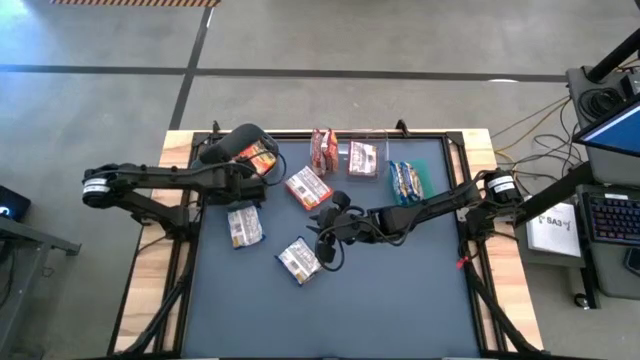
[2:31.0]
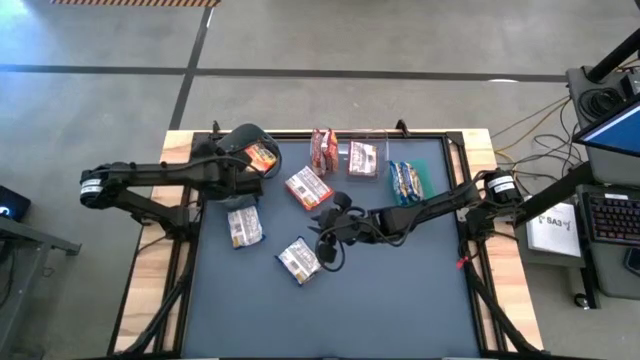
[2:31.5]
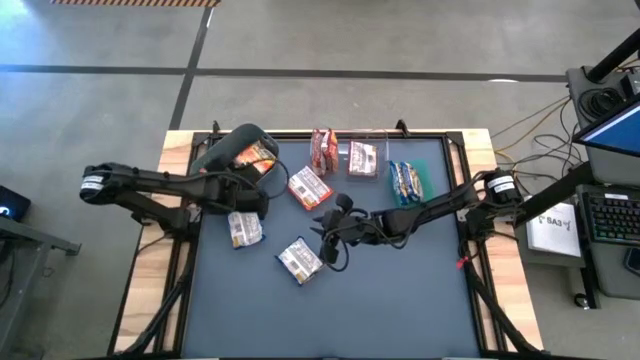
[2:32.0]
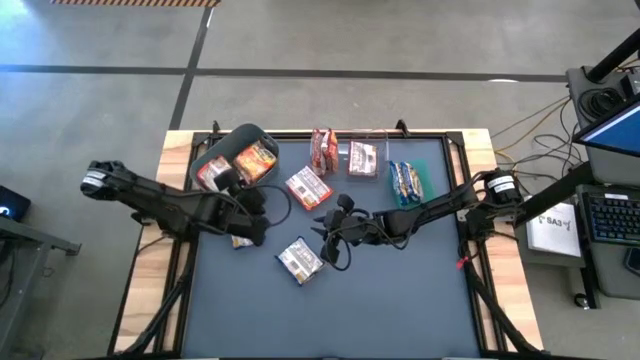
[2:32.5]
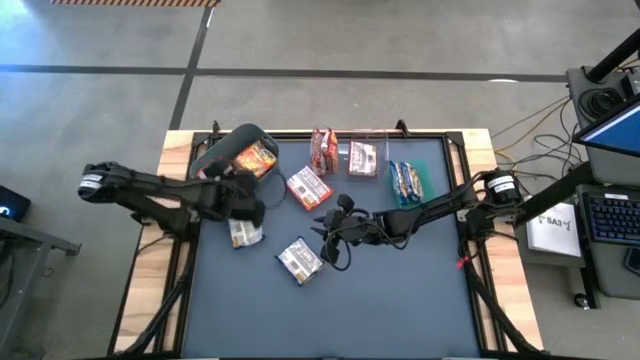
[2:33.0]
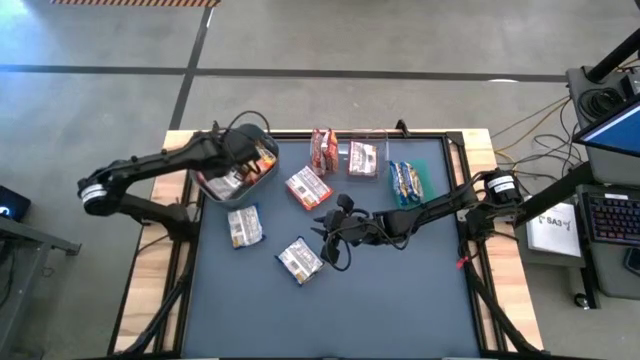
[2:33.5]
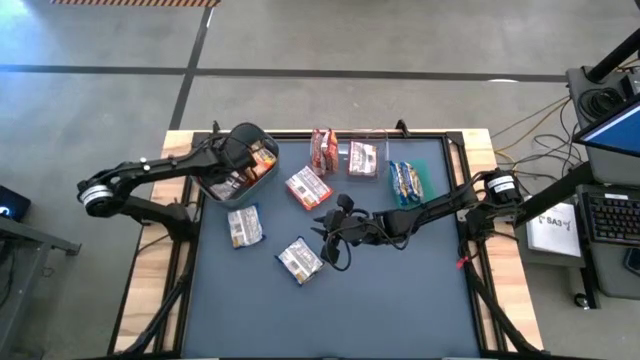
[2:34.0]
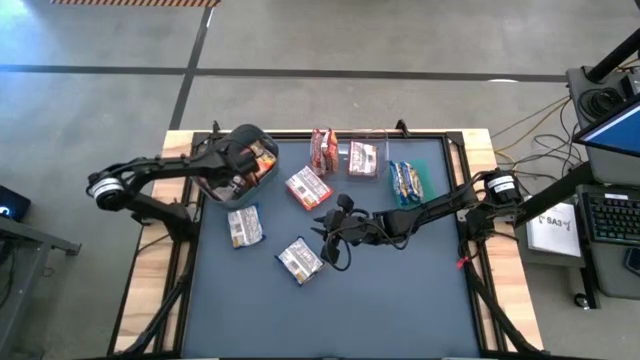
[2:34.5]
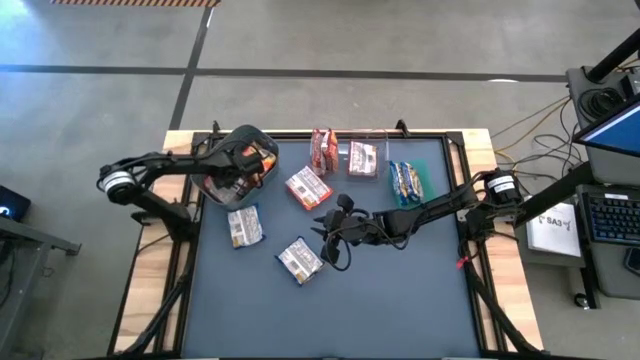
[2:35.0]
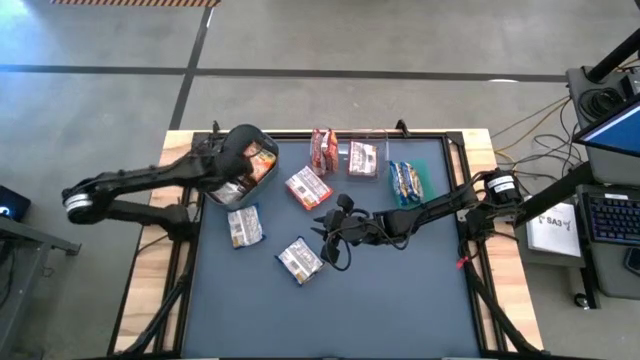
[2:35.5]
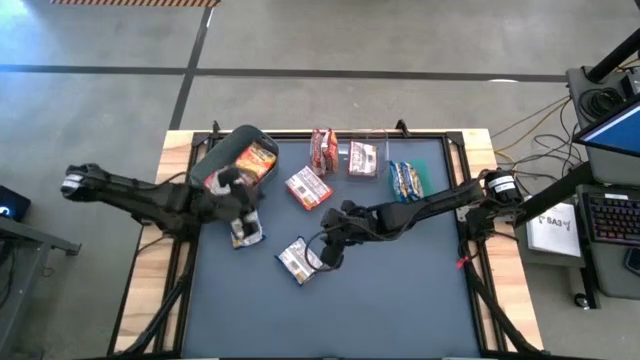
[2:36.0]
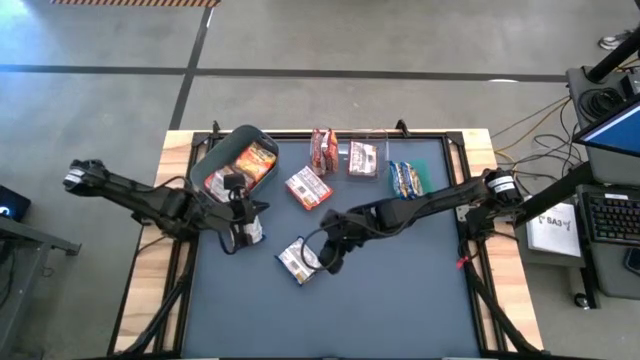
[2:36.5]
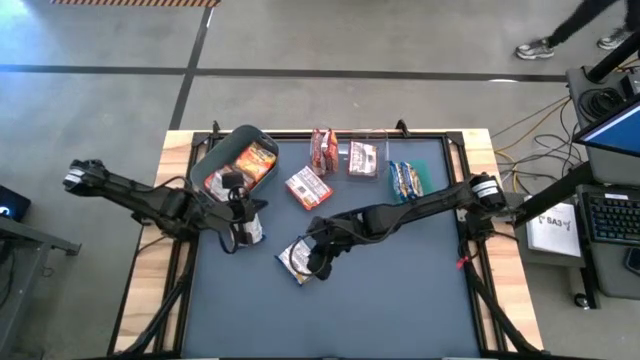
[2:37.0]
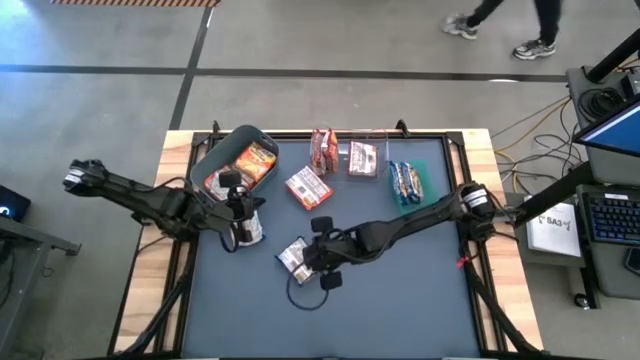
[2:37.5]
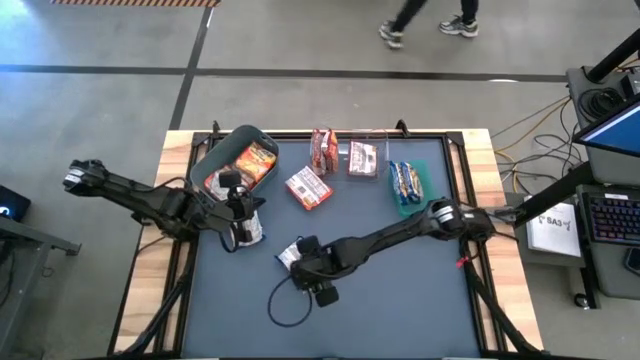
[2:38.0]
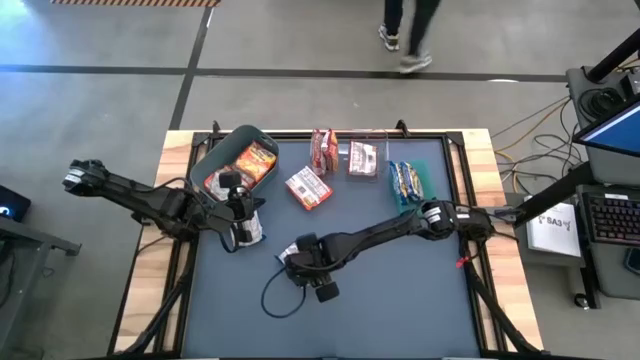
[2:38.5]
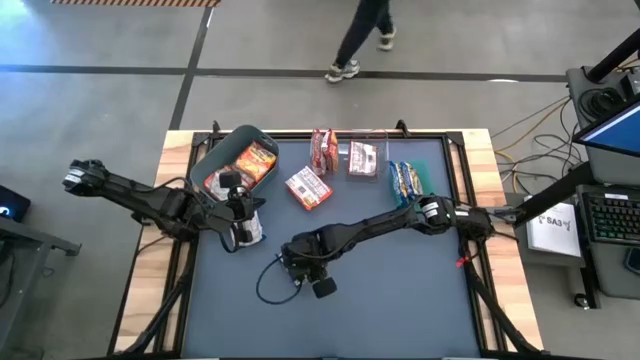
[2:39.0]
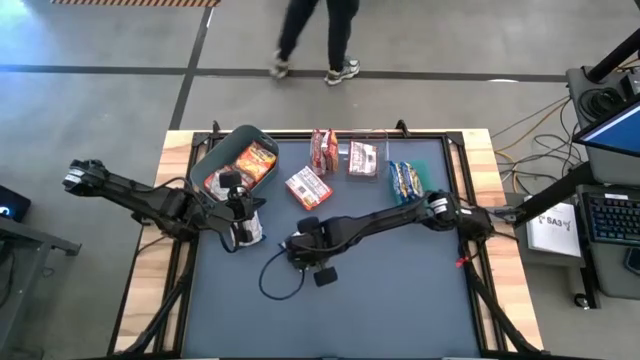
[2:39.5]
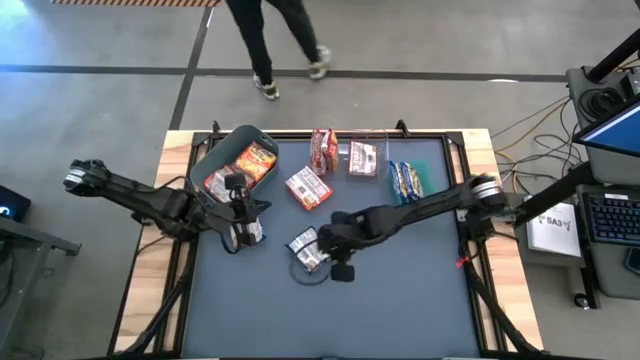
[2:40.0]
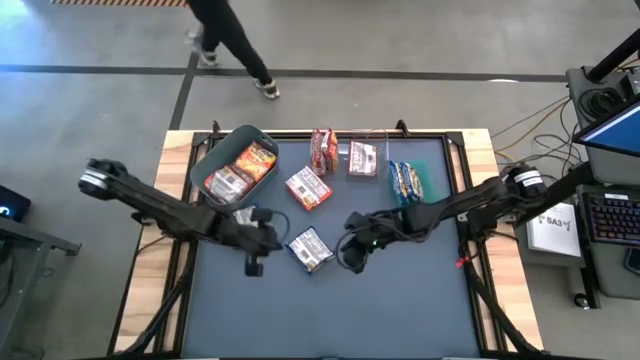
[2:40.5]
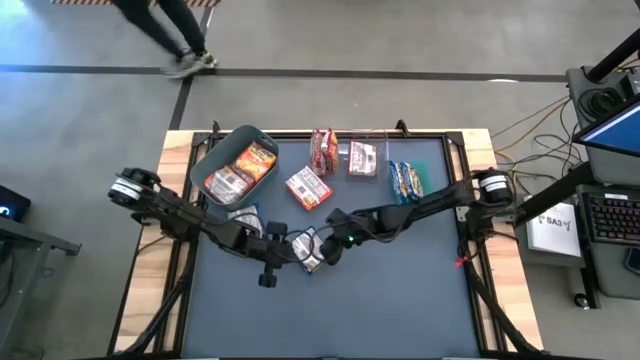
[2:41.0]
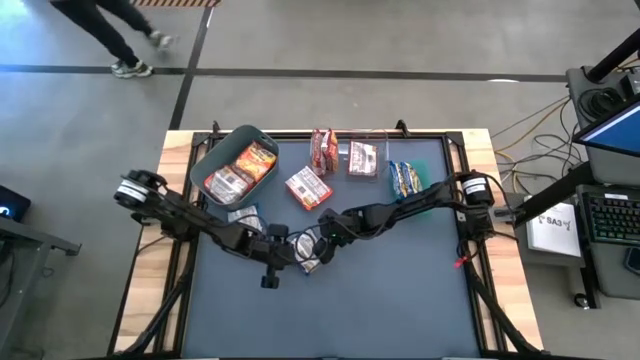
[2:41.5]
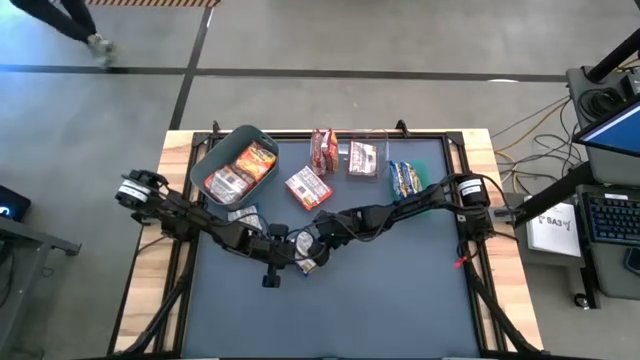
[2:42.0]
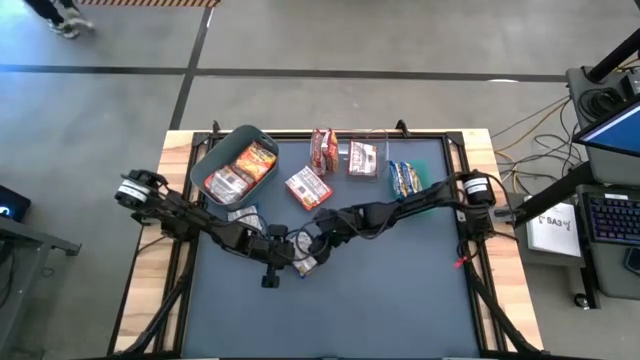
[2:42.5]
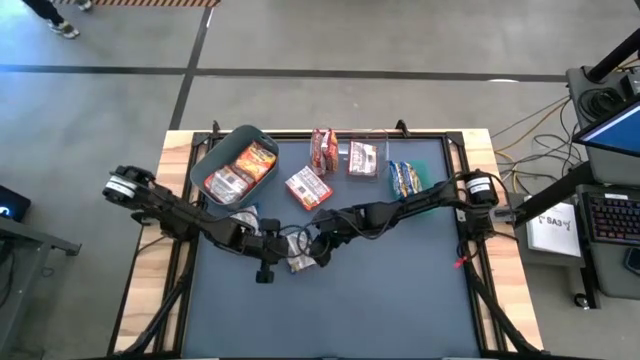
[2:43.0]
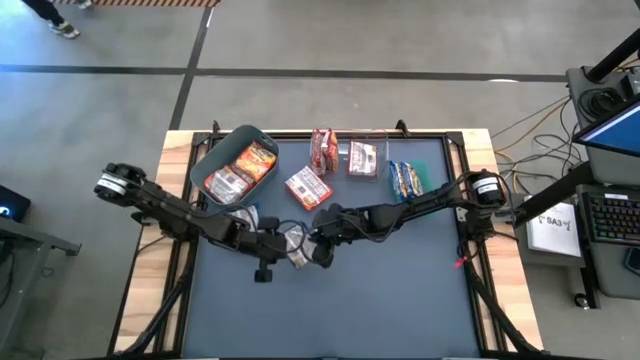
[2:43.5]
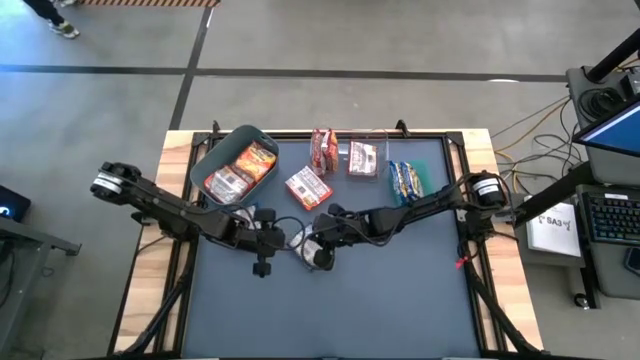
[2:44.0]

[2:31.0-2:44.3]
Task: Sort Maruchan noodles
Put the blue noodle pack into the green bin

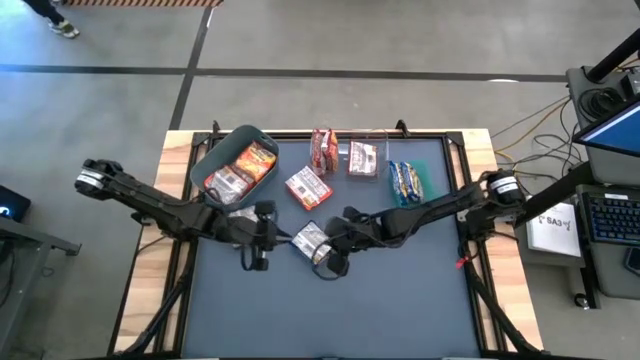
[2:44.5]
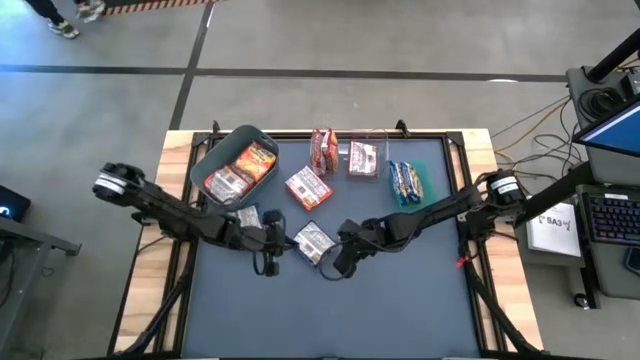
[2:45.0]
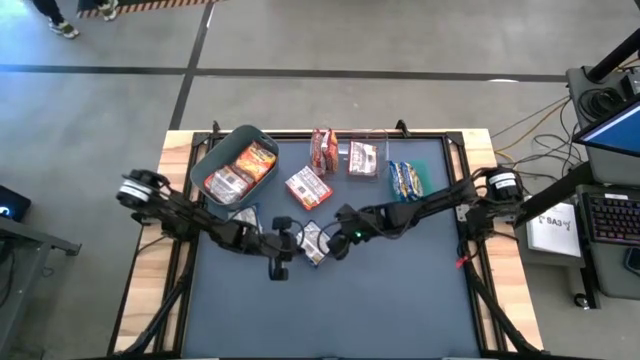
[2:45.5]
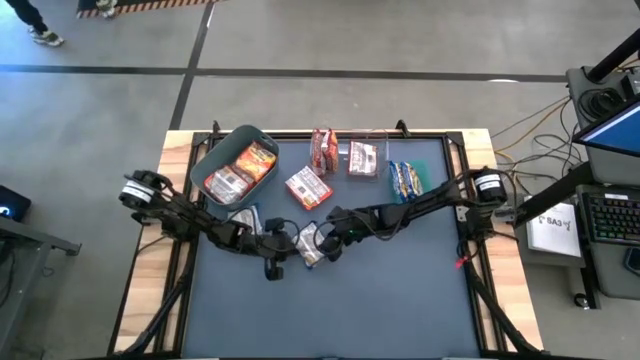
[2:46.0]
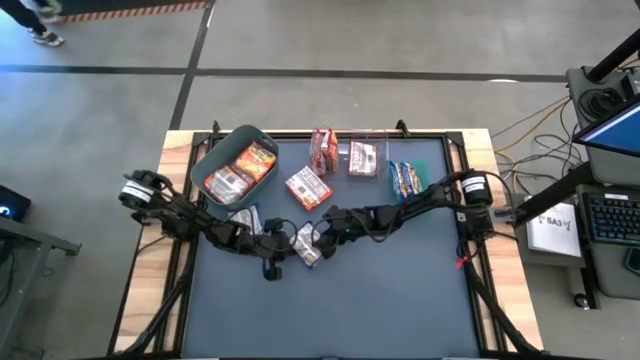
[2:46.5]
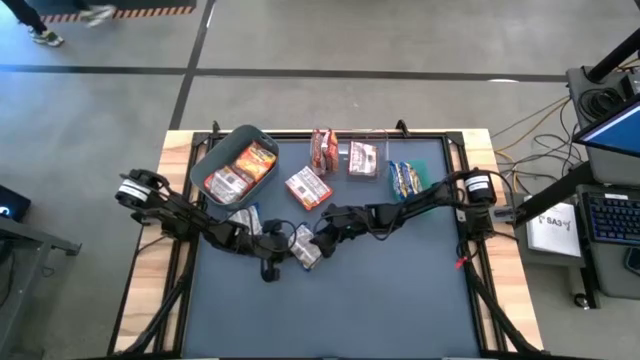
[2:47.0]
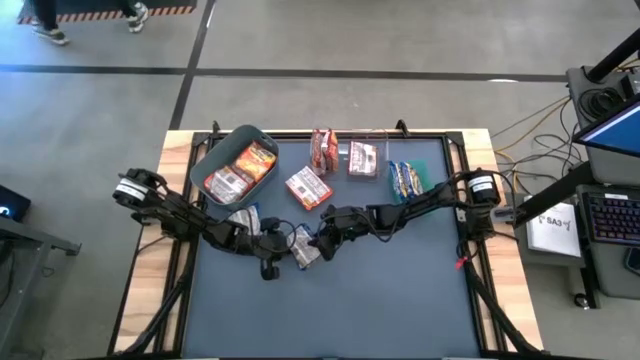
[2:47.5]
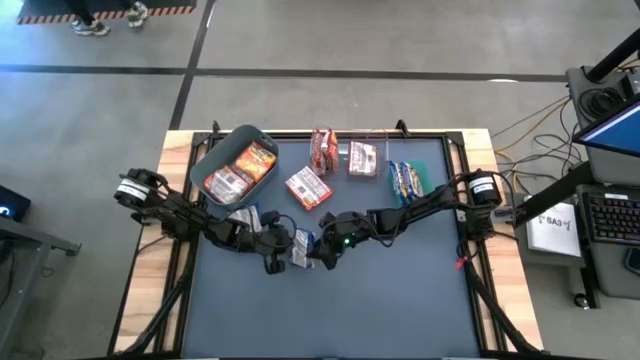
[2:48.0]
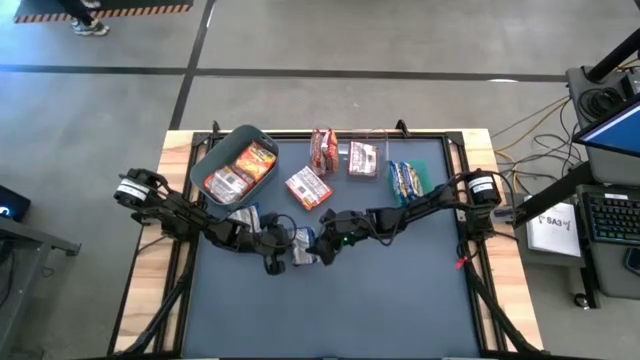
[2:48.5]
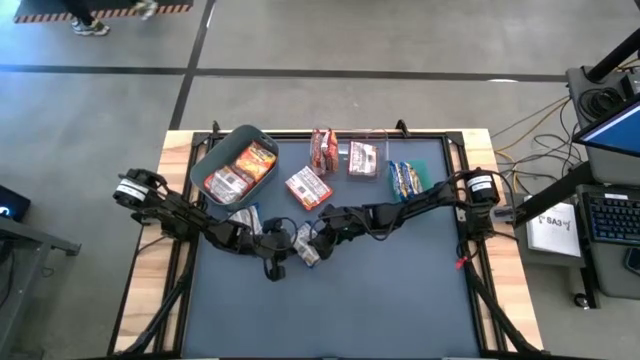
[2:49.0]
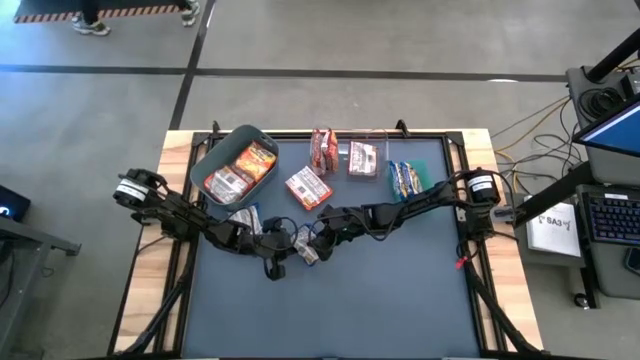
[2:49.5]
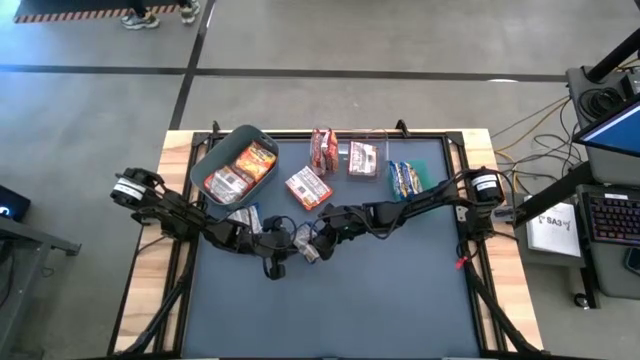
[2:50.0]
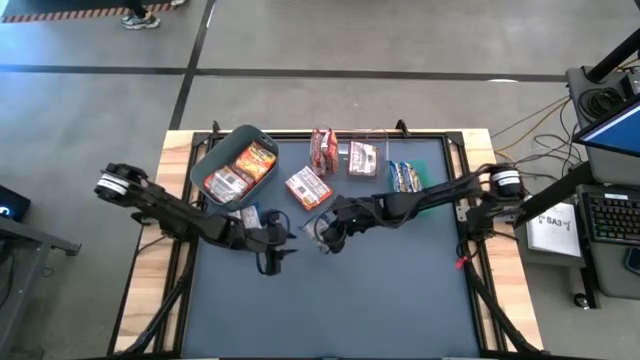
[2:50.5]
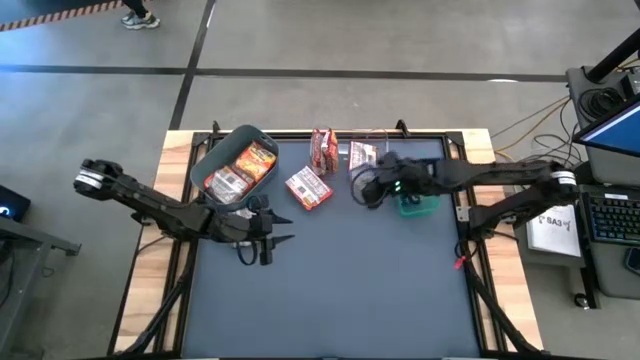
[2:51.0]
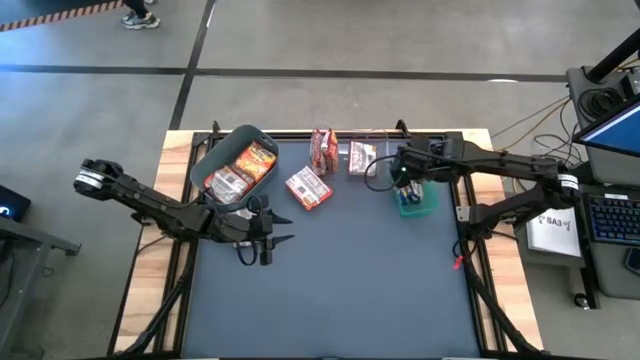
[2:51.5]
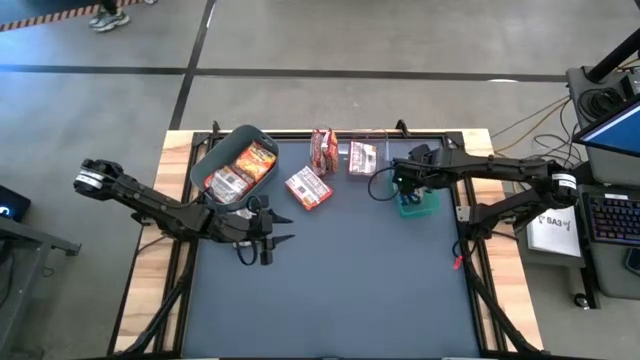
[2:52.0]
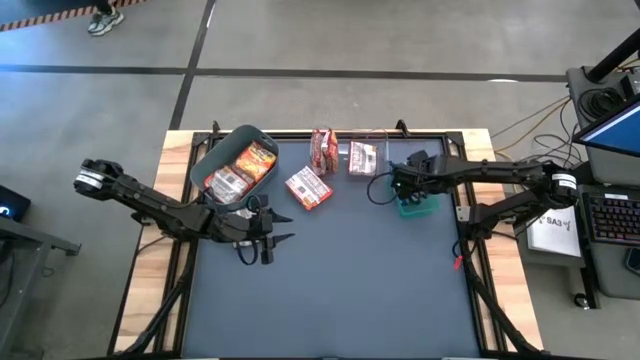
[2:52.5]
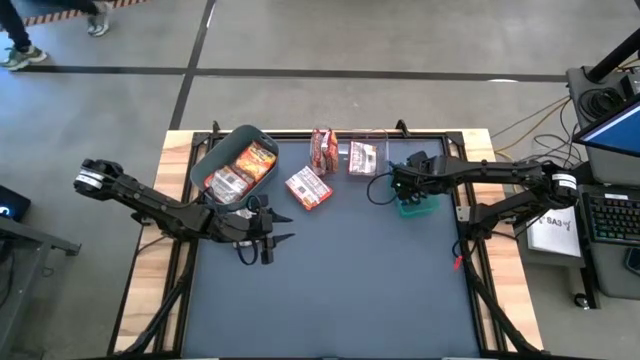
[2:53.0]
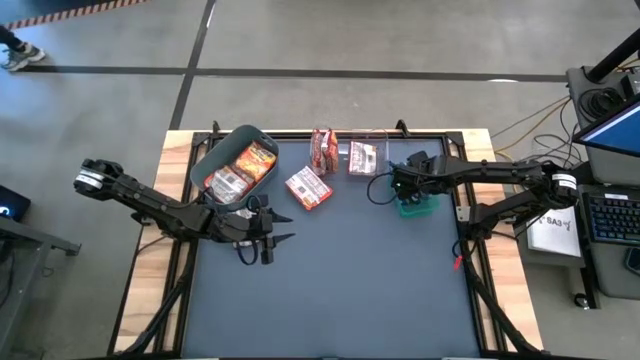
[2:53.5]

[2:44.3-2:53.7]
Put the blue noodle pack into the green bin
